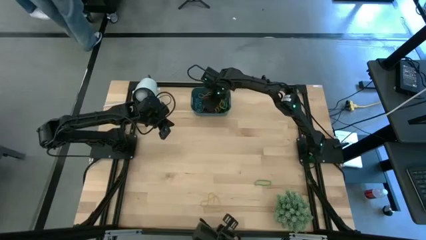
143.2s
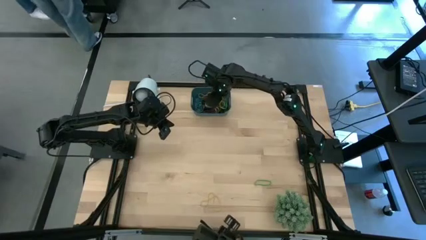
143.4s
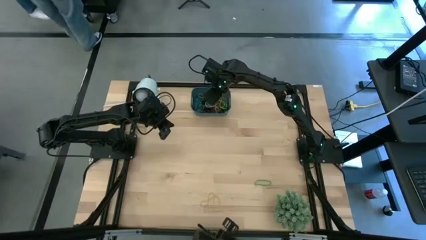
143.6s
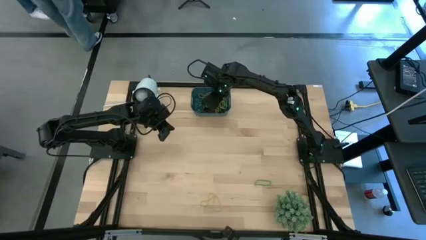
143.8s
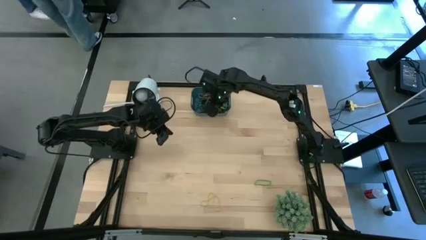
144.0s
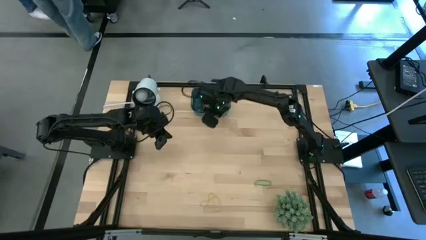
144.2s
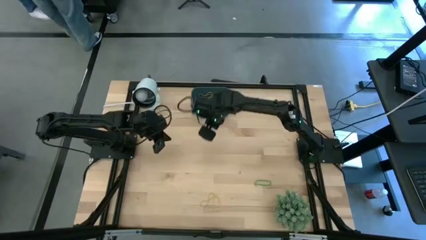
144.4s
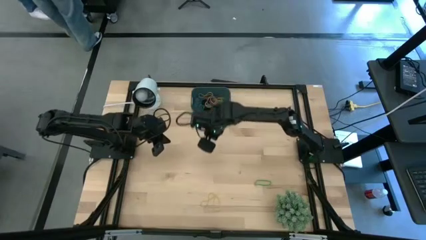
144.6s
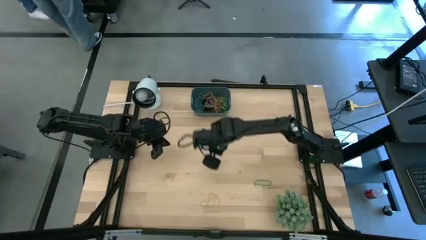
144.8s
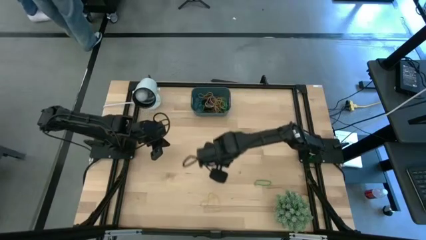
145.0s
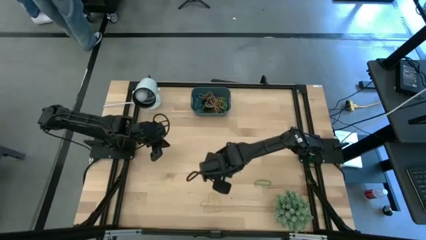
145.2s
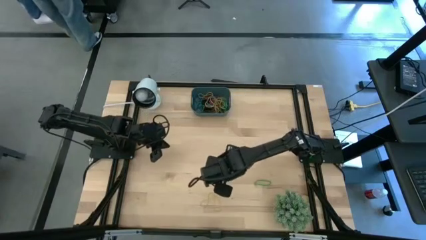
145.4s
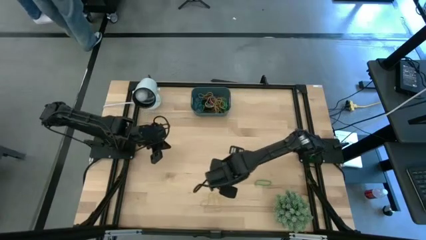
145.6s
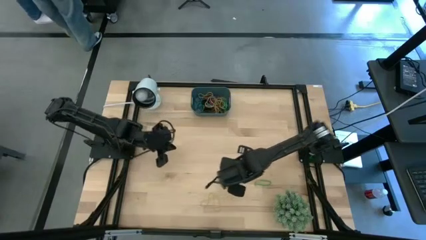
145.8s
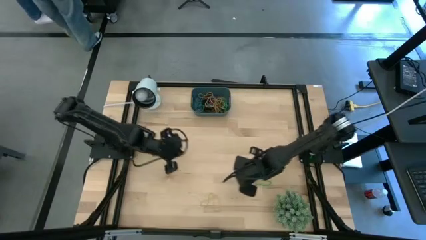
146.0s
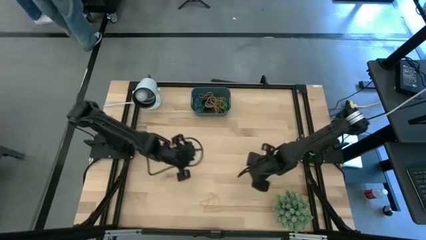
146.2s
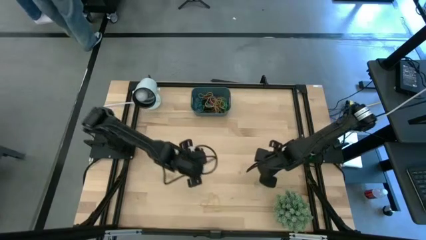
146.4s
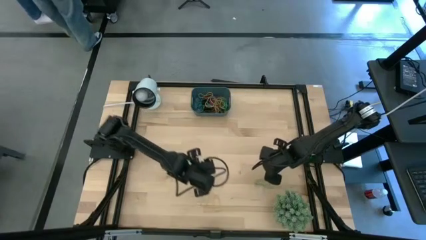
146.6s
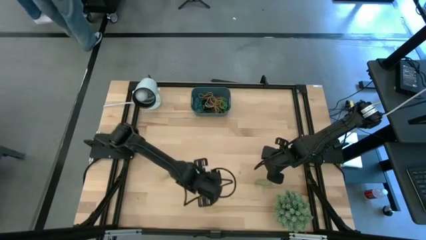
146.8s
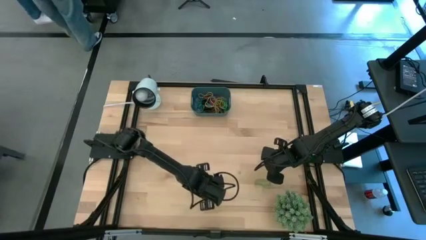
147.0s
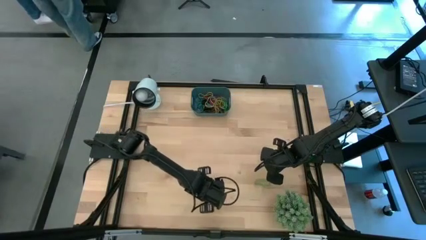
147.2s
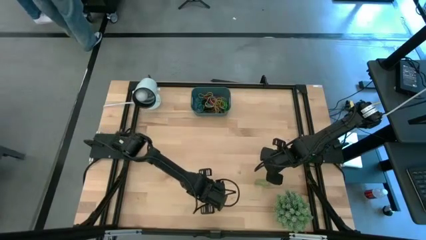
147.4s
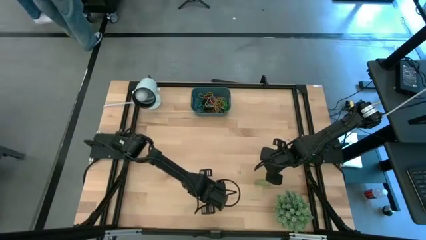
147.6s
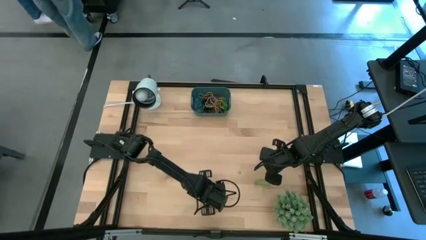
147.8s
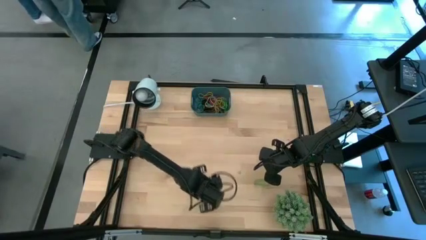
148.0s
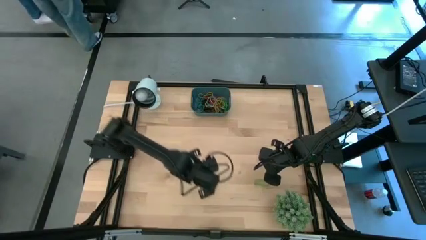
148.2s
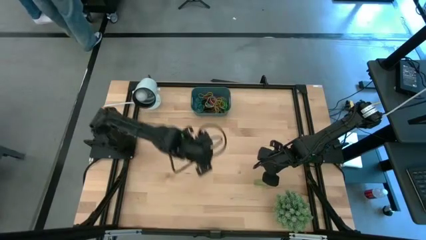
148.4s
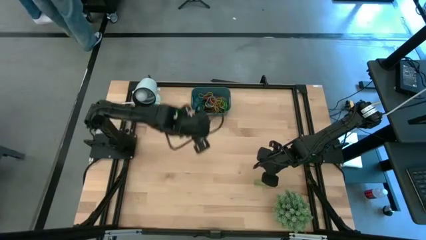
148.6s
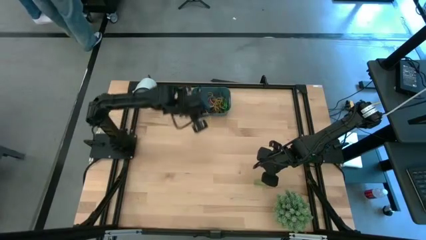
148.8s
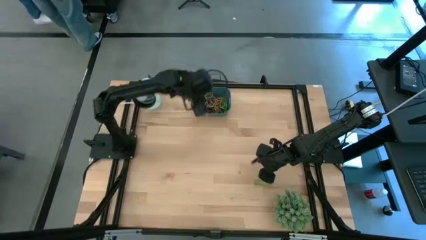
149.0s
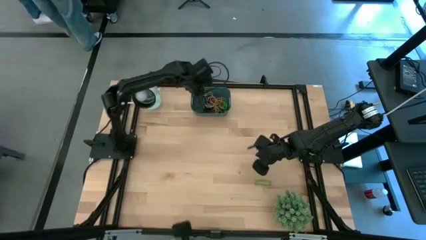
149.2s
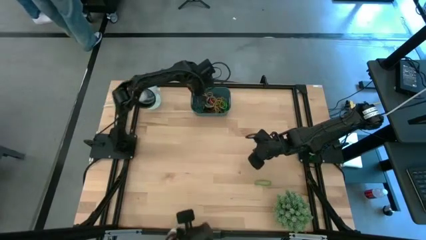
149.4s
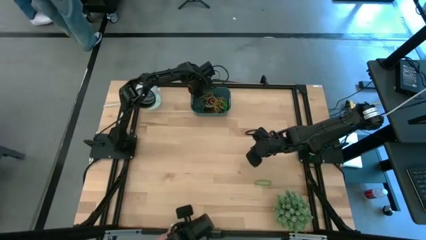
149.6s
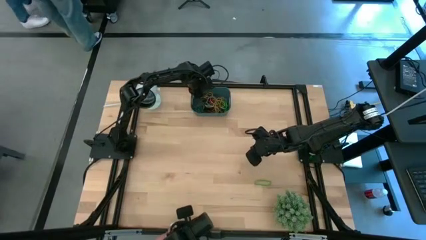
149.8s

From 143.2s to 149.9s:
Task: Pick and place rubber bands into bin
Put the yellow rubber band into the blue bin

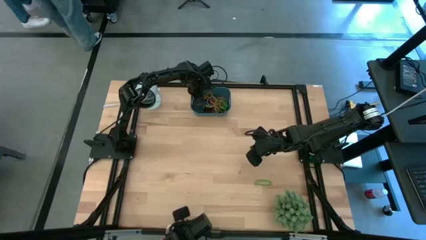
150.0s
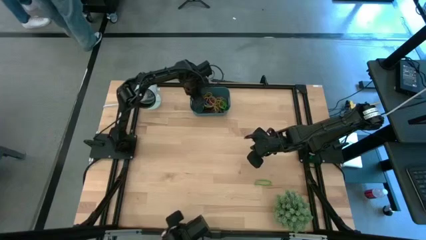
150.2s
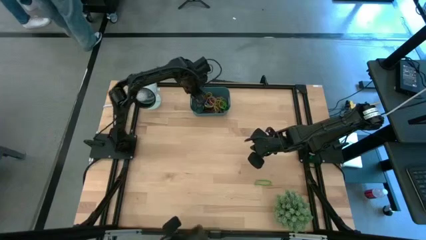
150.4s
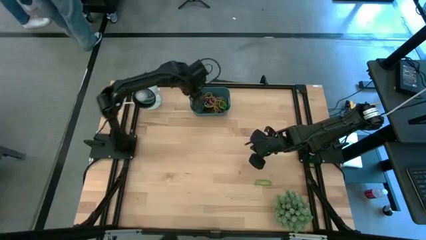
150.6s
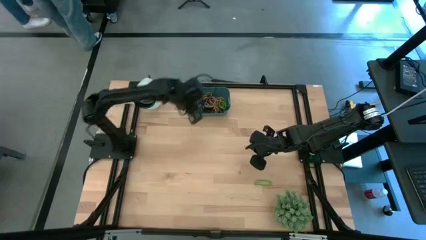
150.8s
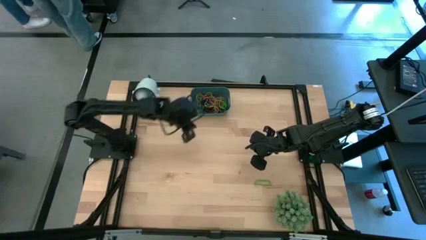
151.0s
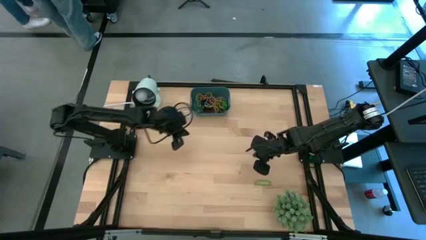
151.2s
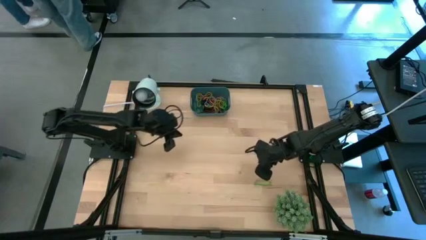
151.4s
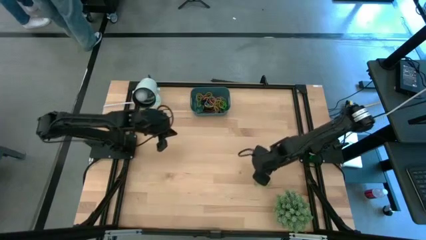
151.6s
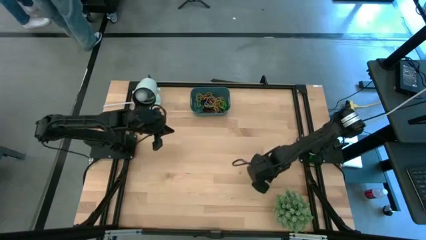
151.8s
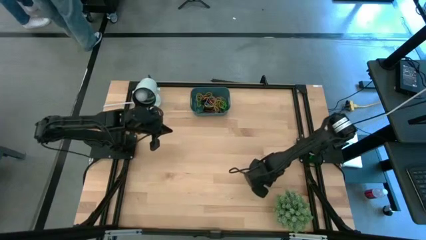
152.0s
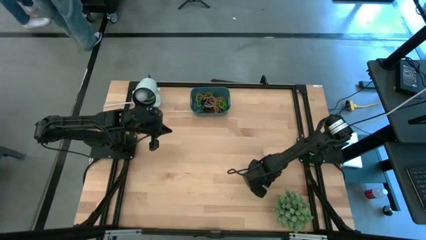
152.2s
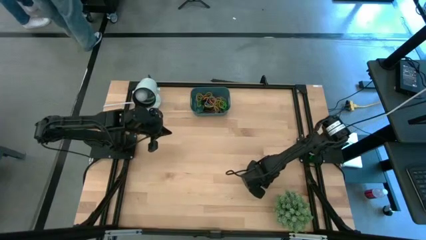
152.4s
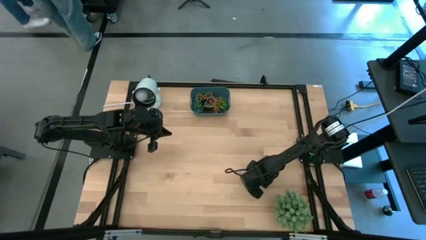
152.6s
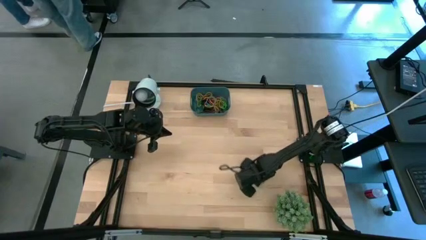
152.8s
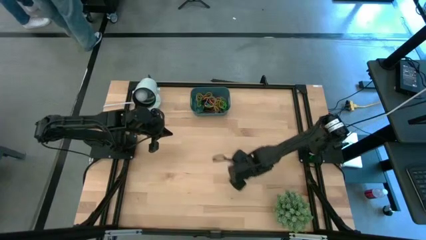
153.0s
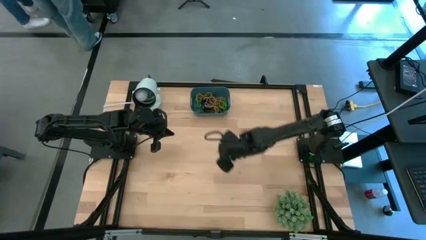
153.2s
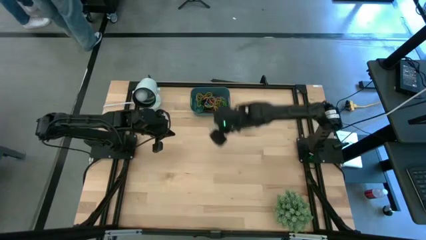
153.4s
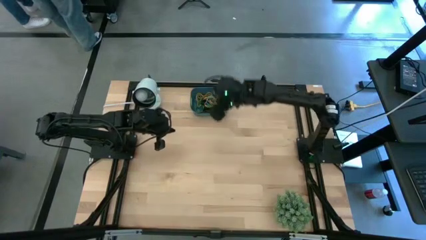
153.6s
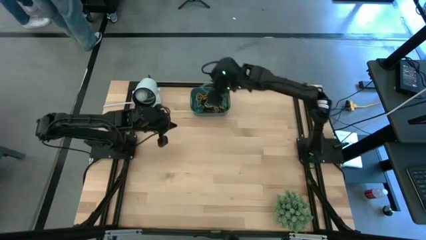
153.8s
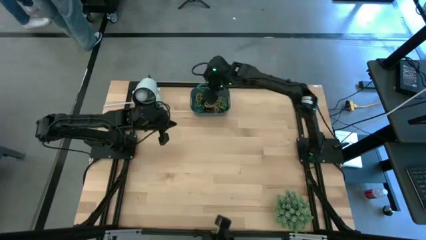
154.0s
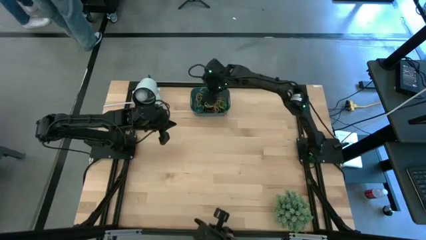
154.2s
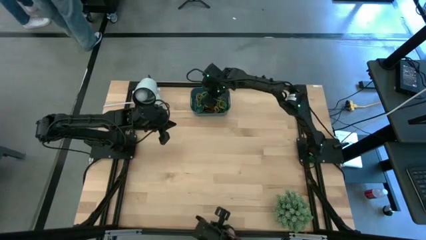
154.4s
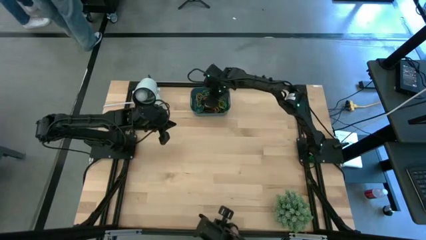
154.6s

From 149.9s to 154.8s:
Put the green rubber band into the blue bin

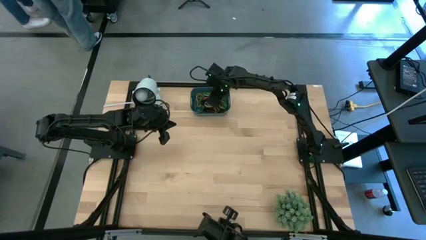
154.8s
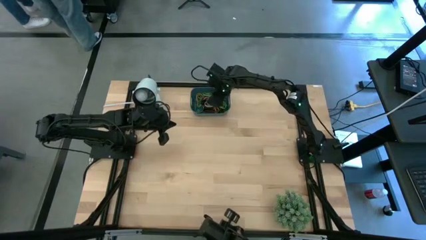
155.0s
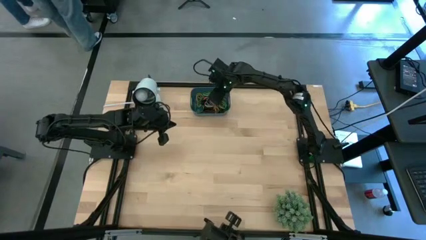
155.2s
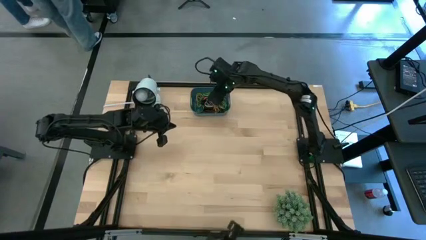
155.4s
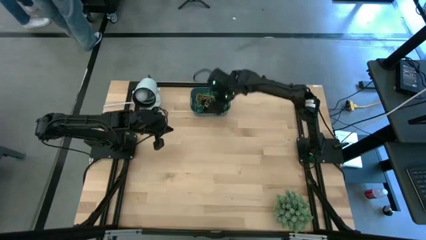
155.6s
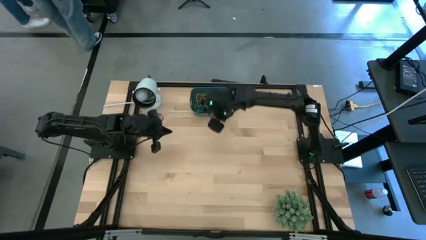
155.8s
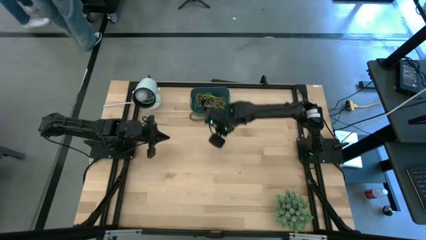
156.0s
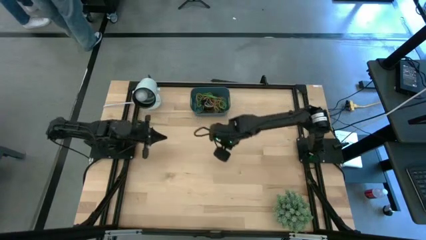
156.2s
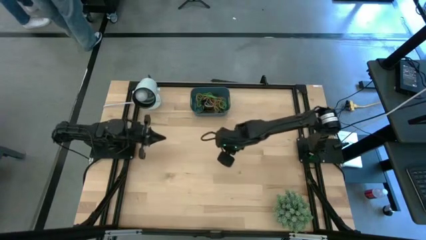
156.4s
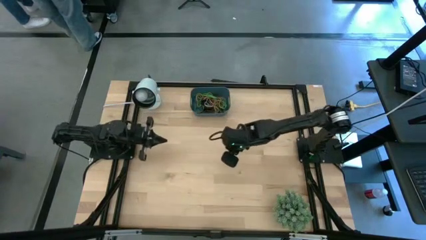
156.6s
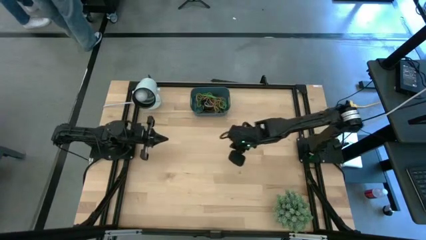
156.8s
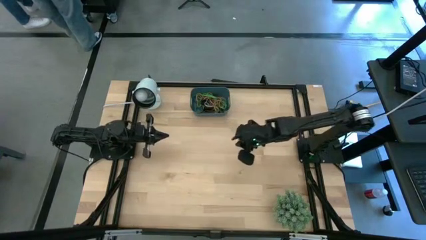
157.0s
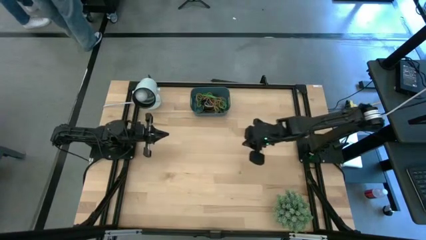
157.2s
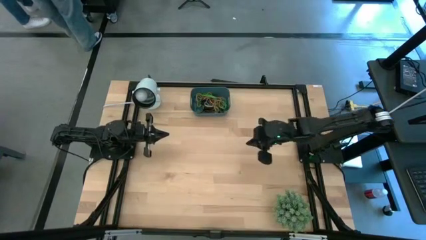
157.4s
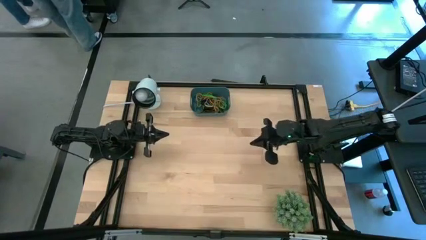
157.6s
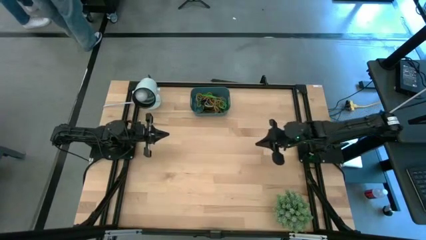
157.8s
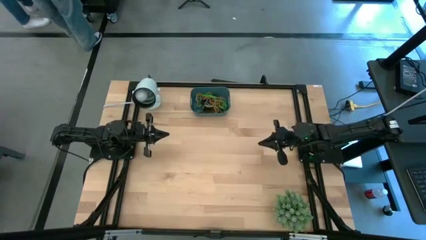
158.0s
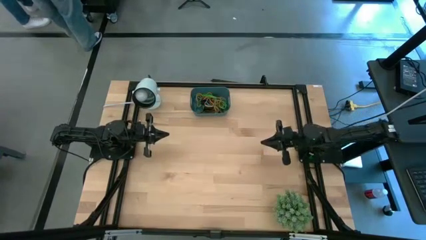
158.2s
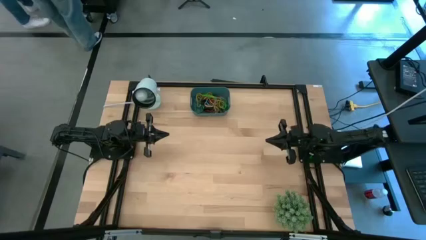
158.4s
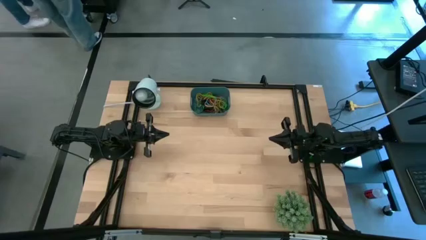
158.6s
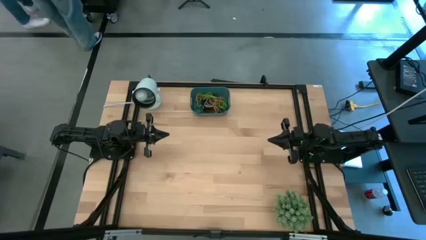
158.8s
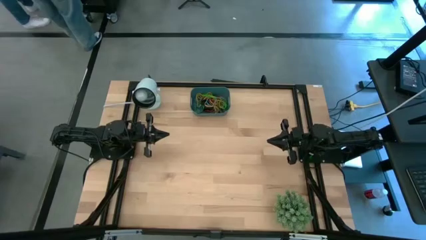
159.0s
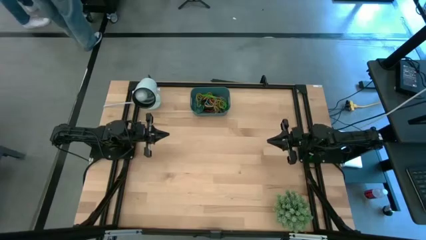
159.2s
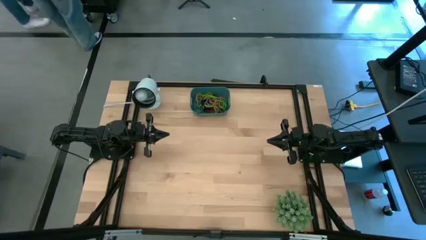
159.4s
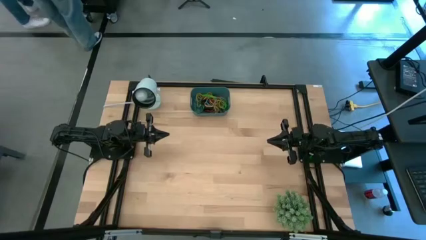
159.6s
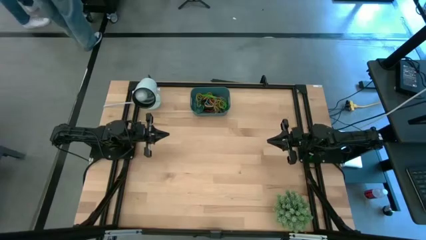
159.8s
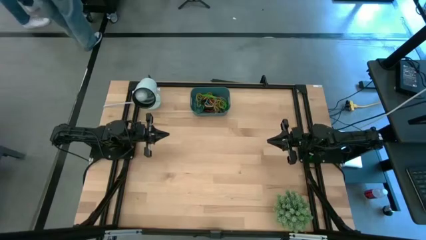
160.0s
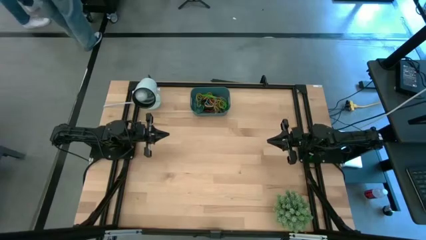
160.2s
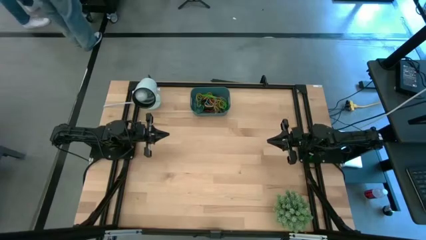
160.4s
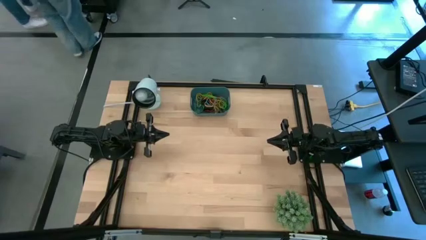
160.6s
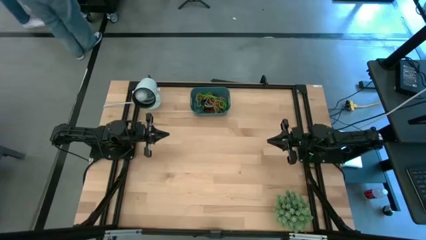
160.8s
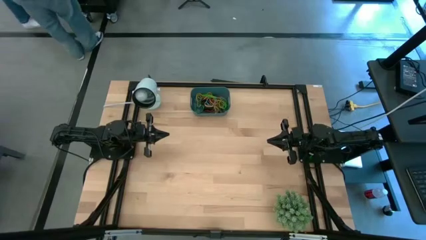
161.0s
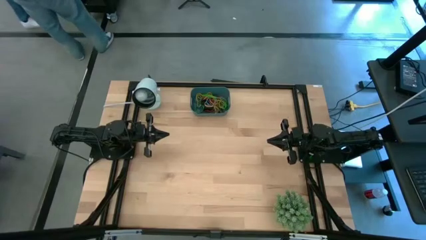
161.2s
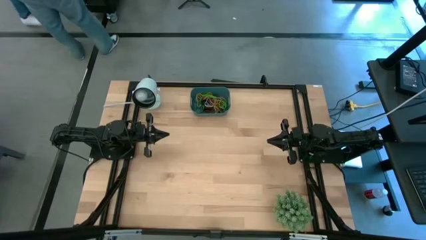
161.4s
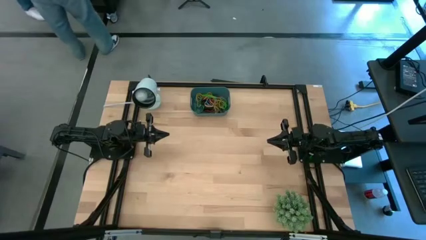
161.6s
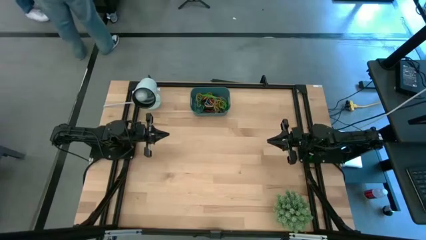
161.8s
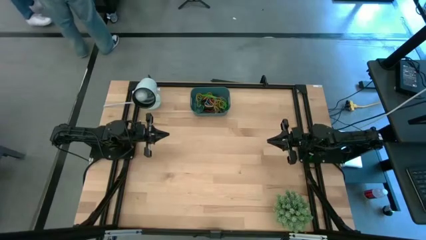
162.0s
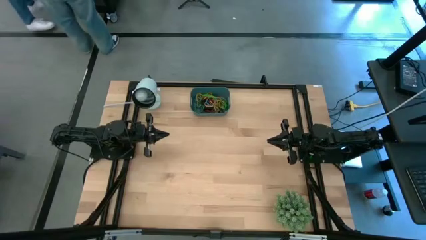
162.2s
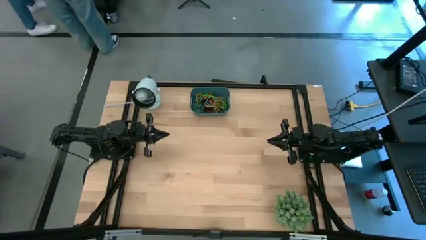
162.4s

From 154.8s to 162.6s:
Return to Home Position
